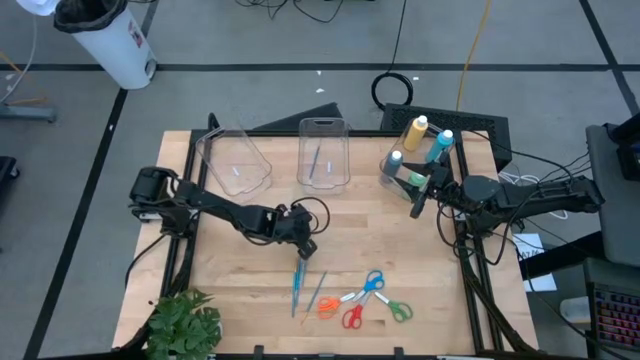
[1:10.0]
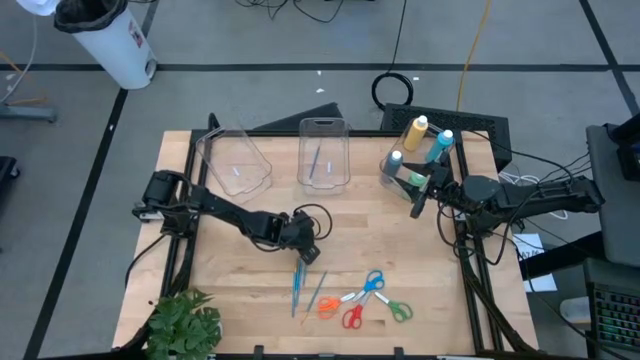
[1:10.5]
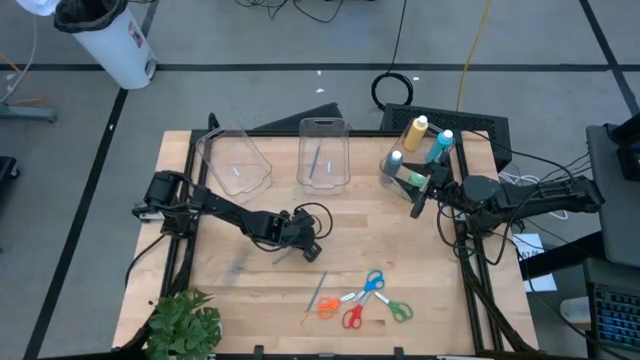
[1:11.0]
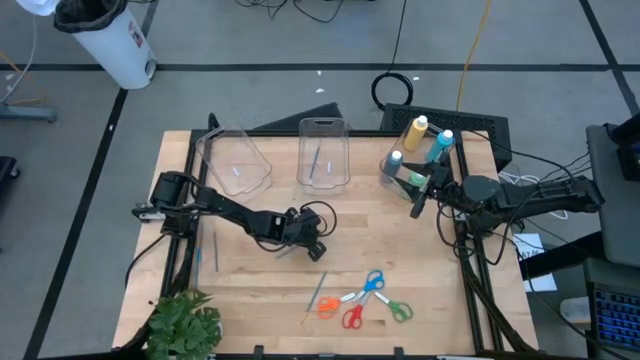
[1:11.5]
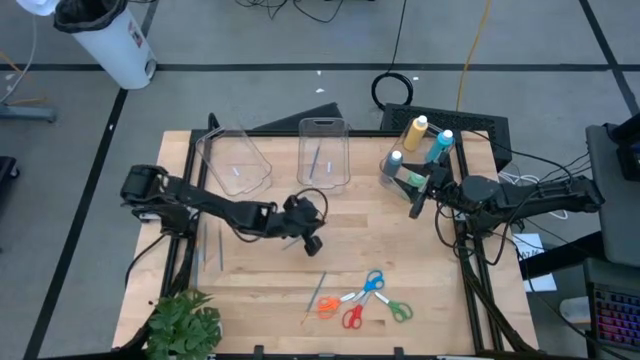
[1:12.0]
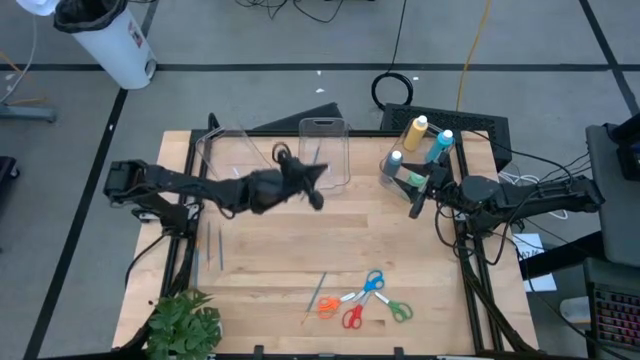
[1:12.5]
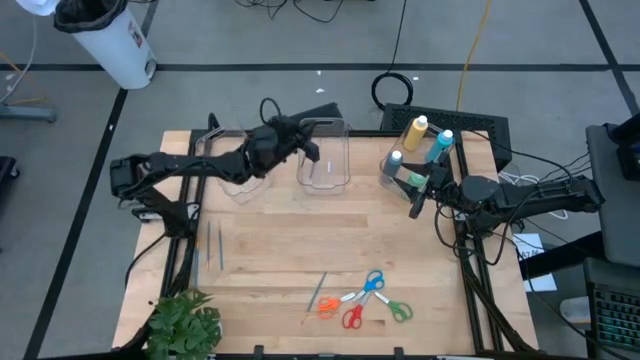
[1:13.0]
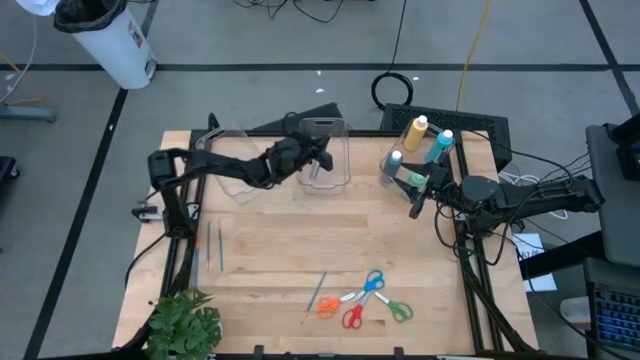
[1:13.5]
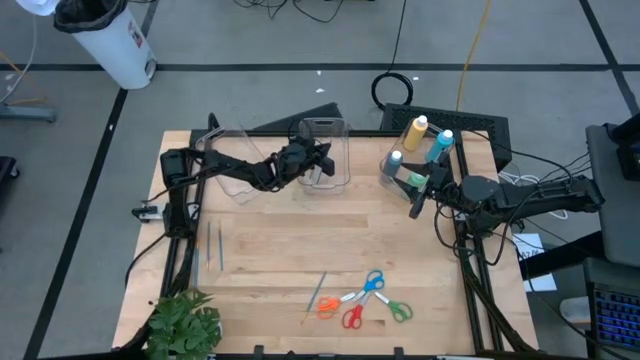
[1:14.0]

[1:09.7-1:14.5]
Task: Pick & Place Paint Supplies
Put the blue paint brush into the middle transparent bin

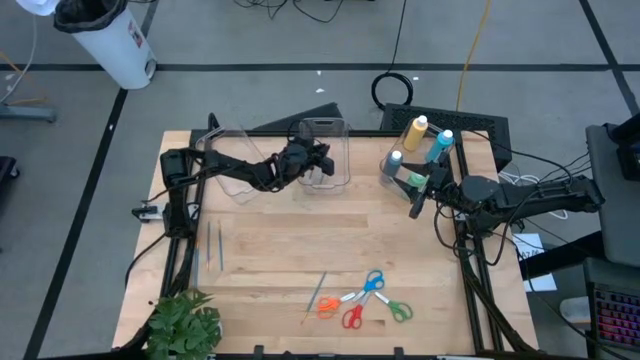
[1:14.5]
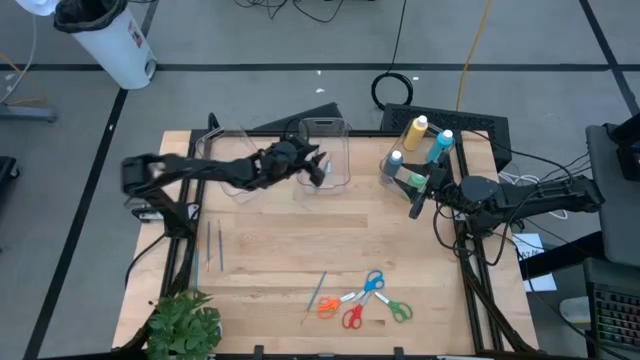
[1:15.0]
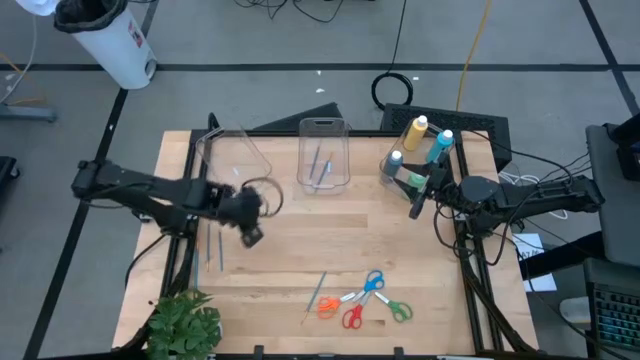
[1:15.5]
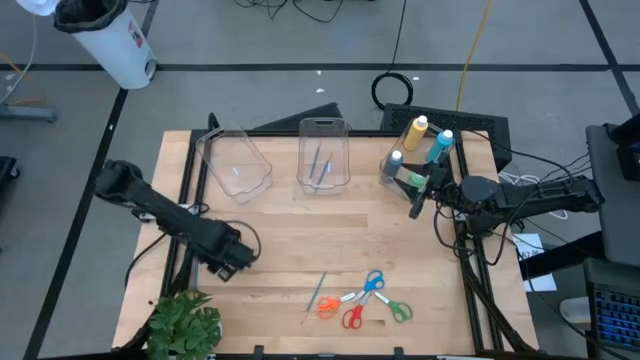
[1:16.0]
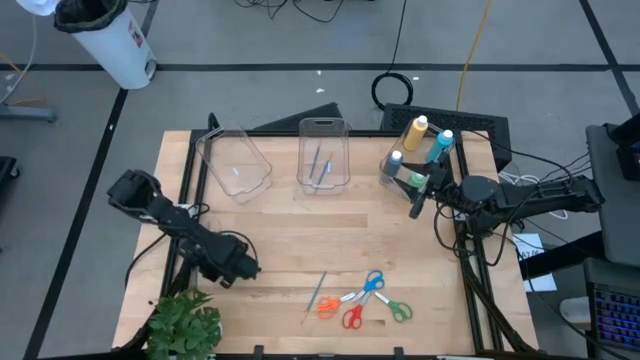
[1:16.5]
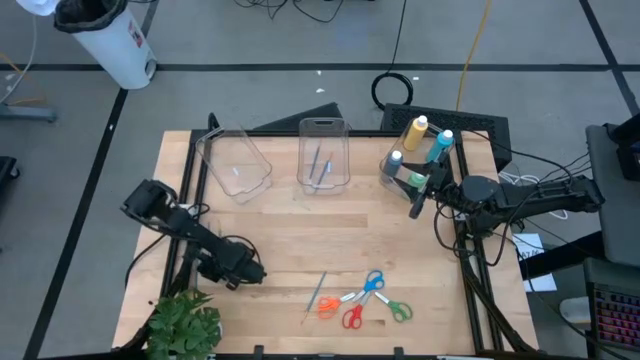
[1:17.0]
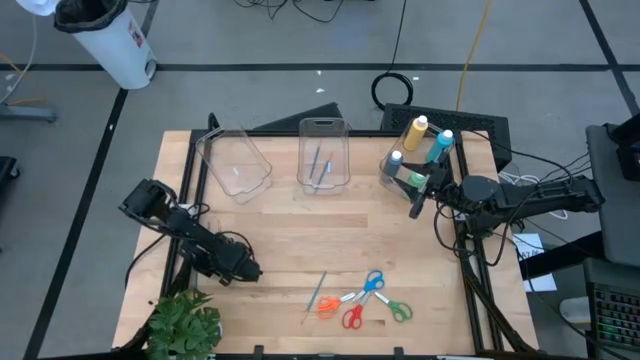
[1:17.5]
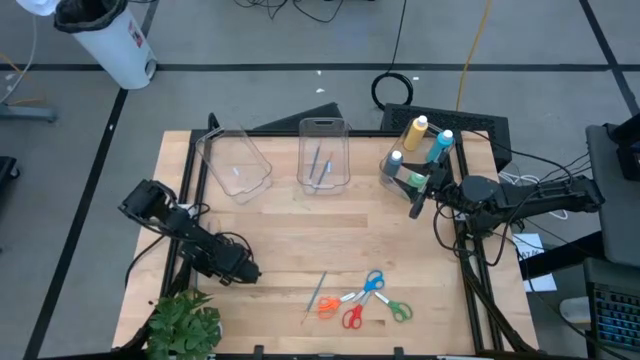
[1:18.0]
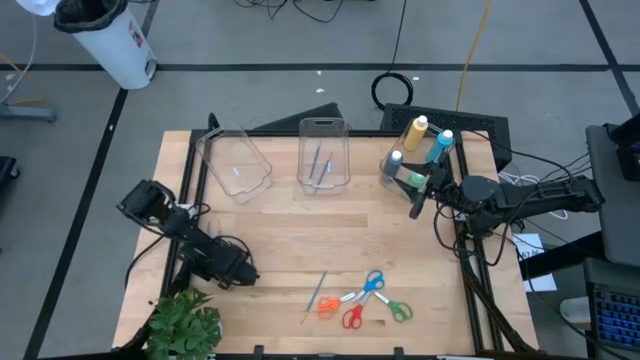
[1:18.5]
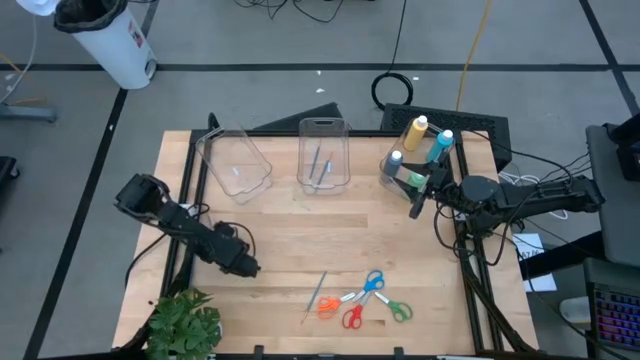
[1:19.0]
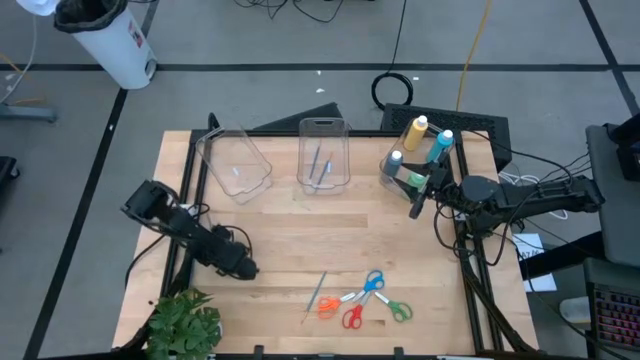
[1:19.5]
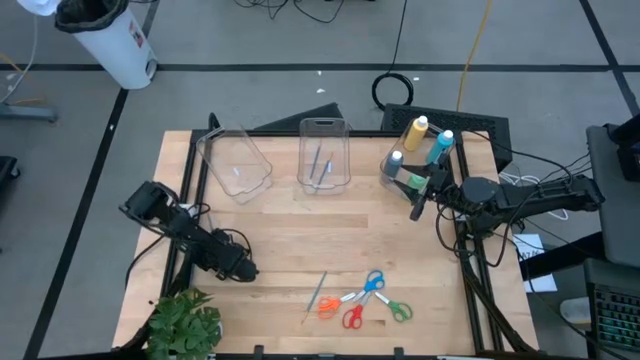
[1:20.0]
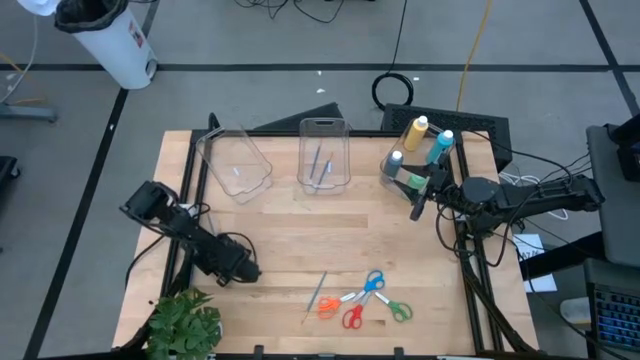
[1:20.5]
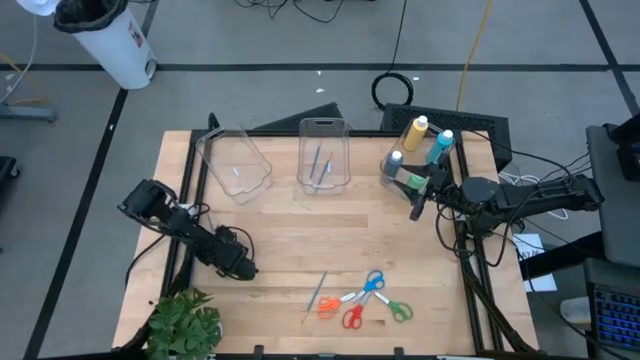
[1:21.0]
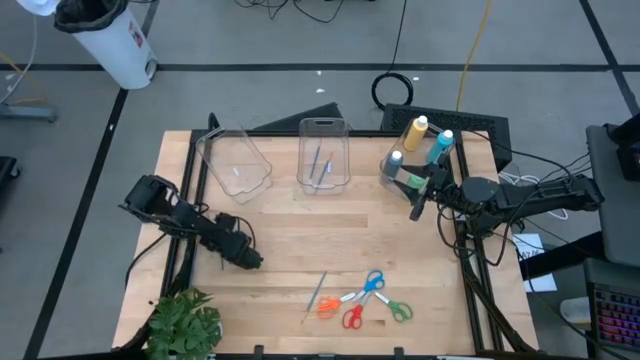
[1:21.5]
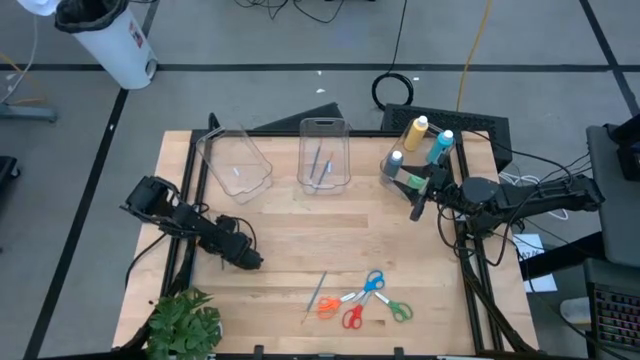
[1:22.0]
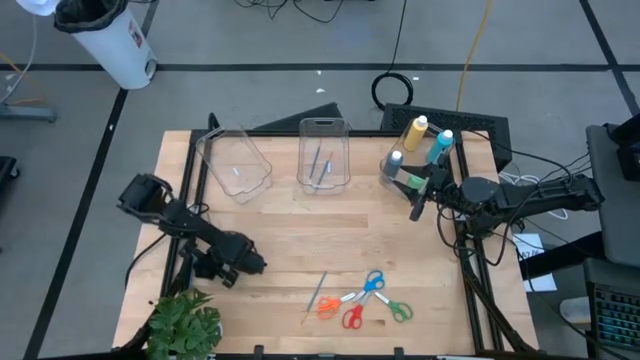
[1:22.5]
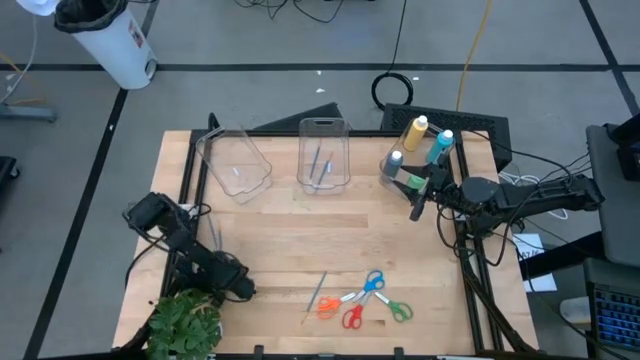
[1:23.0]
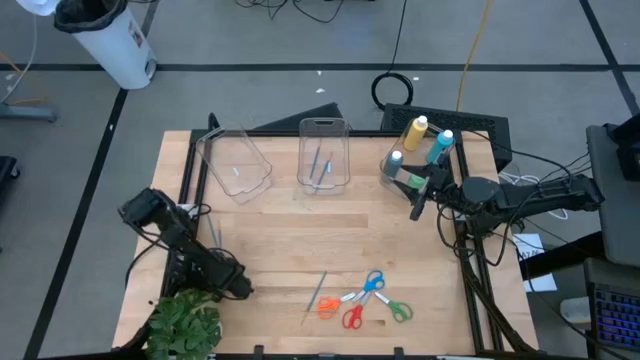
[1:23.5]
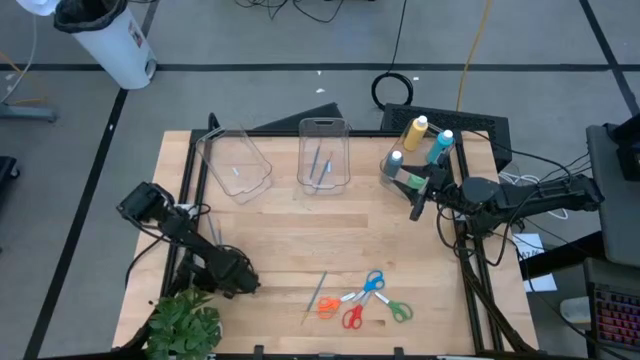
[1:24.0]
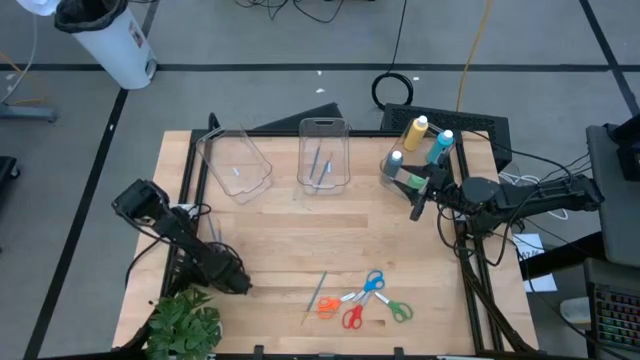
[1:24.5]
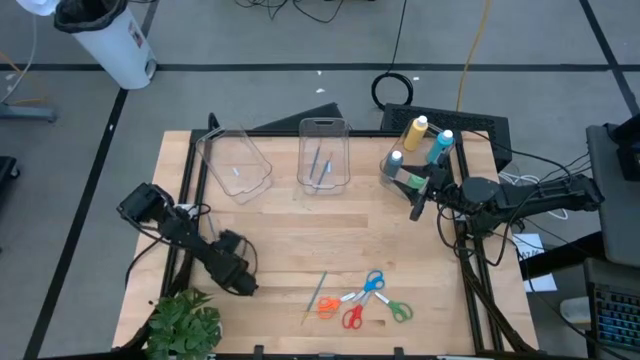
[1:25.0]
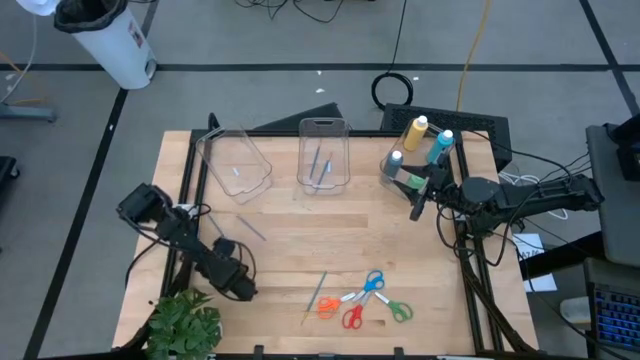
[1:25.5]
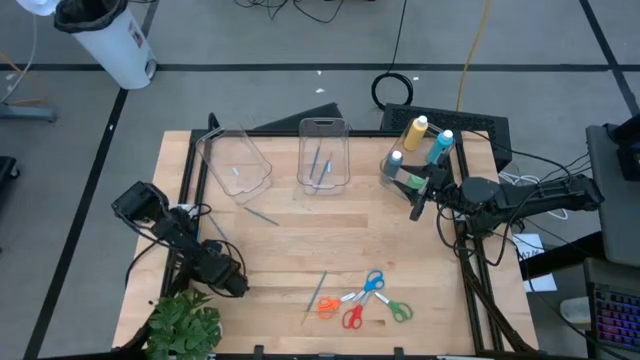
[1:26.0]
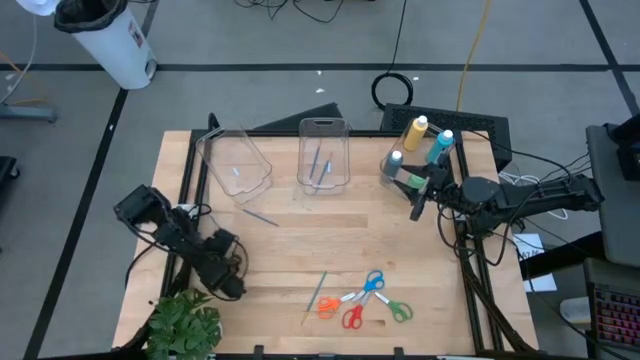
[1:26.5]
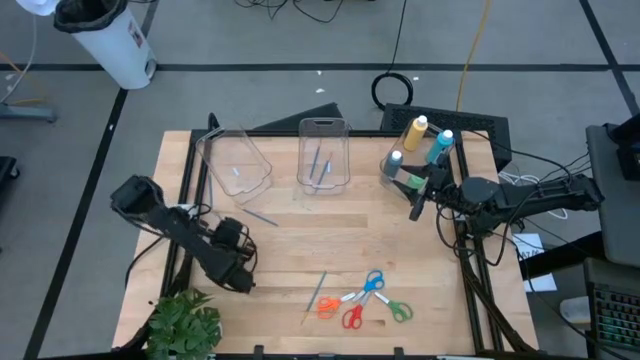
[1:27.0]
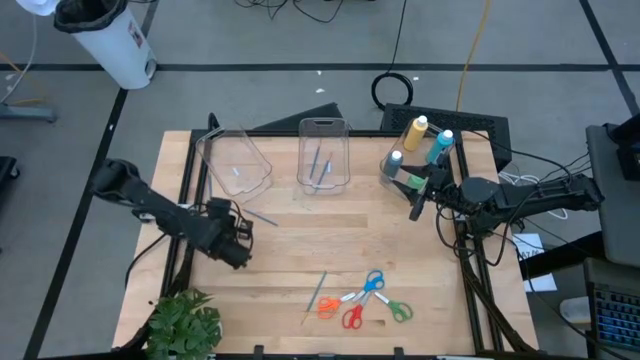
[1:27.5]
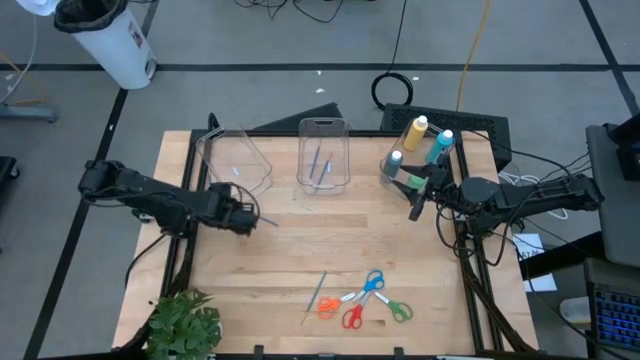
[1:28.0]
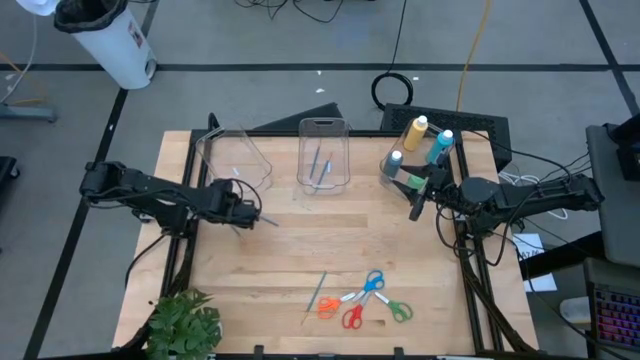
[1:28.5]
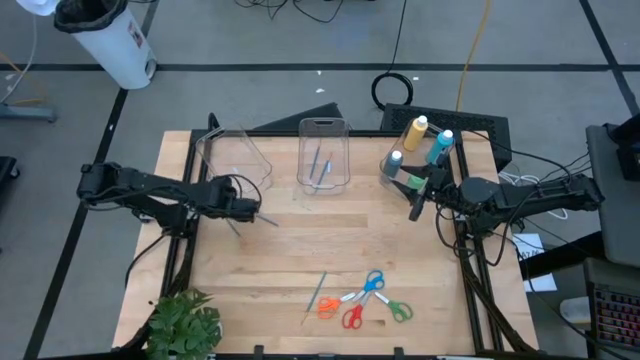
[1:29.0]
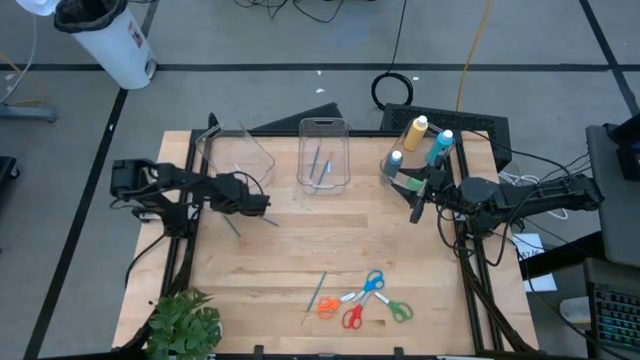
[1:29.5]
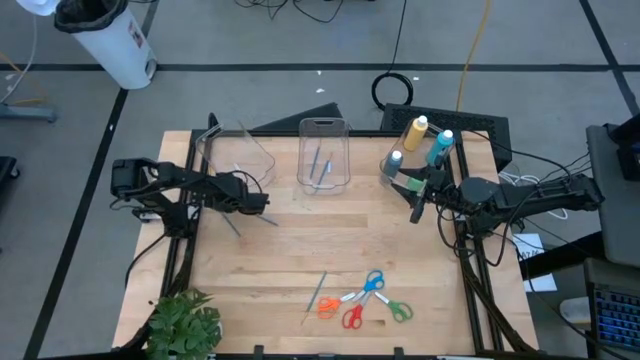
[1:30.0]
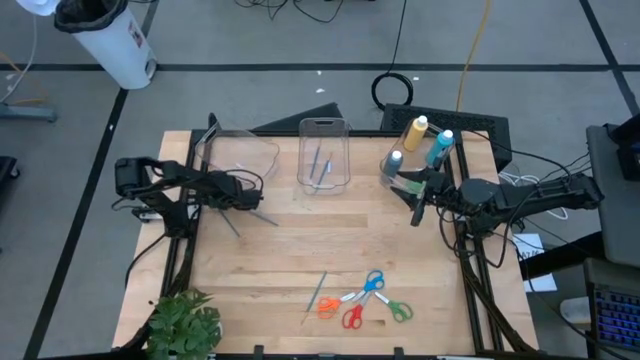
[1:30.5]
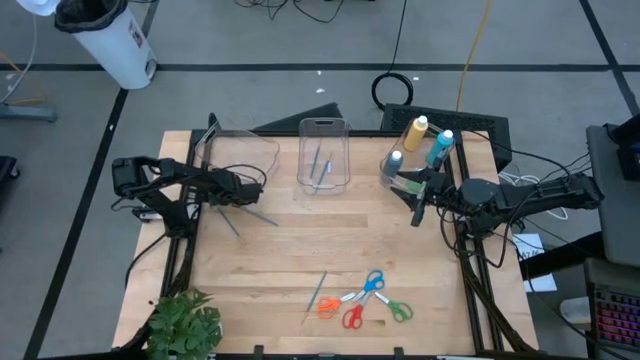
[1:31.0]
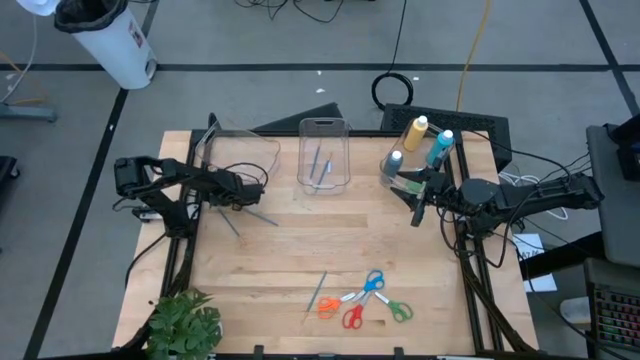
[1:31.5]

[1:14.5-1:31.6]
Put the blue paint brush into the middle transparent bin

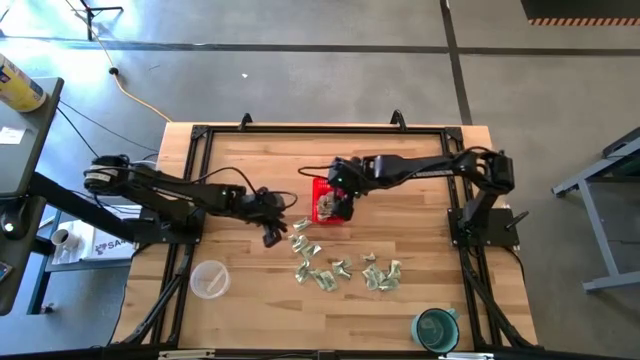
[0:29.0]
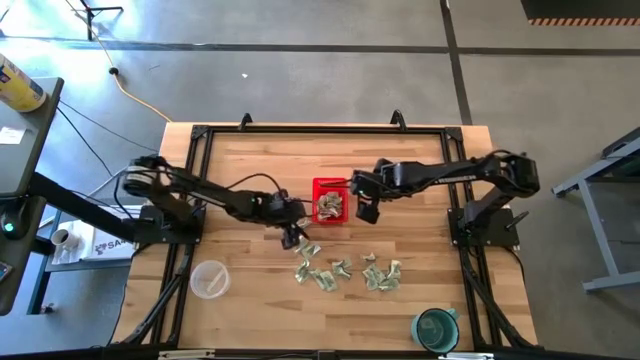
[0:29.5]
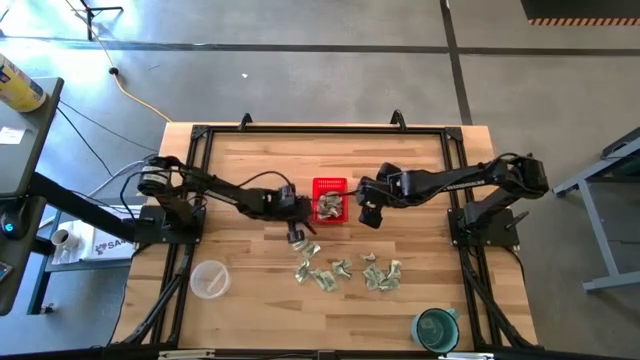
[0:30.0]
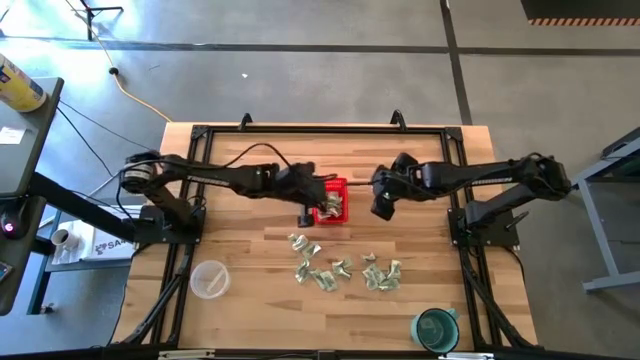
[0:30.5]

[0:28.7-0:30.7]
Task: Pick and place items into bin
Put the light green stevia packet into the red bin
